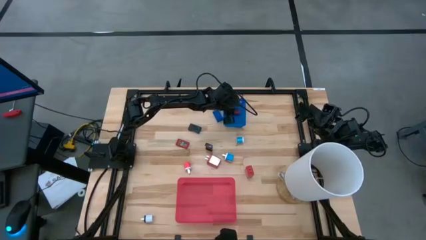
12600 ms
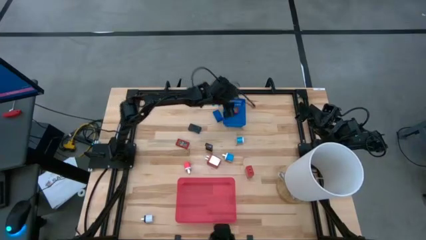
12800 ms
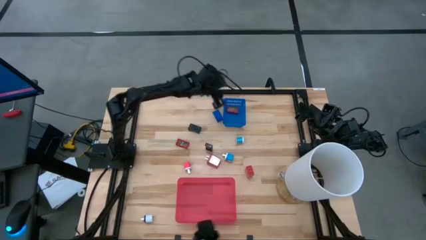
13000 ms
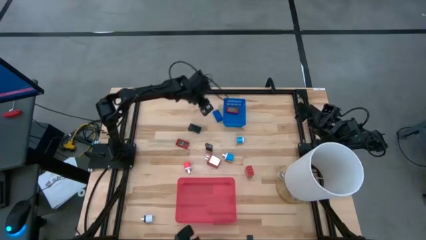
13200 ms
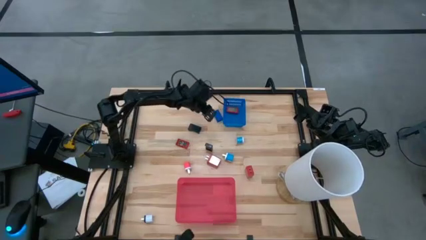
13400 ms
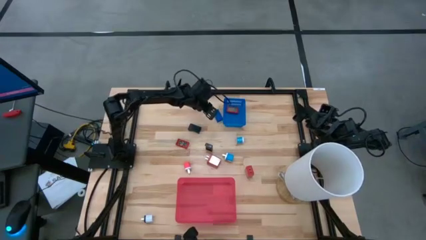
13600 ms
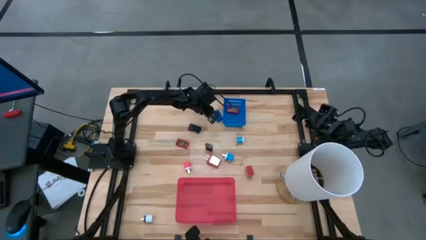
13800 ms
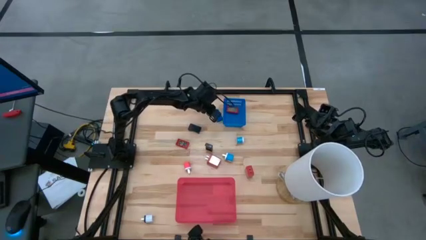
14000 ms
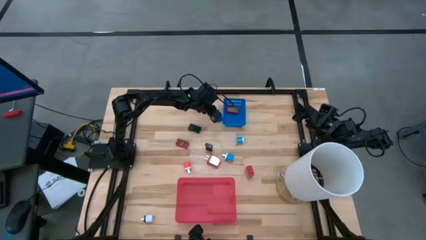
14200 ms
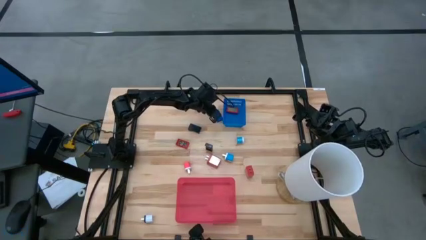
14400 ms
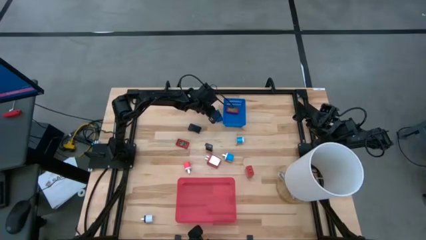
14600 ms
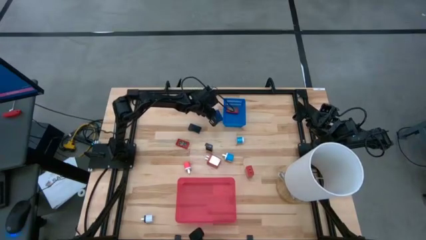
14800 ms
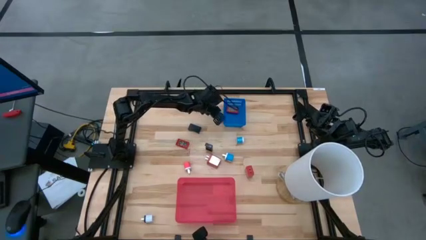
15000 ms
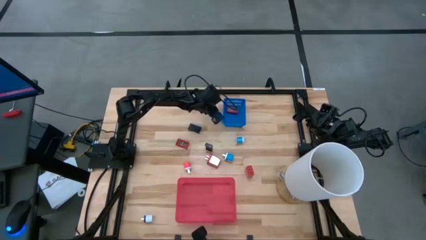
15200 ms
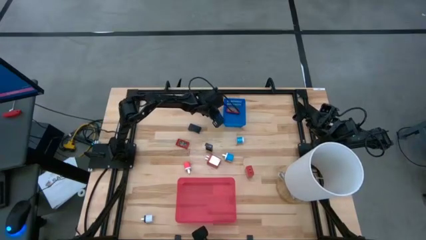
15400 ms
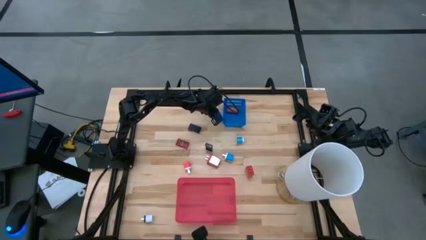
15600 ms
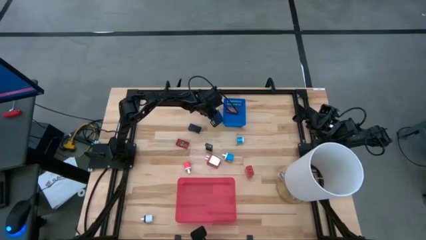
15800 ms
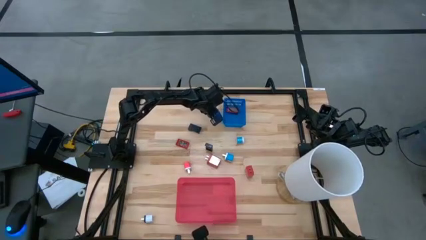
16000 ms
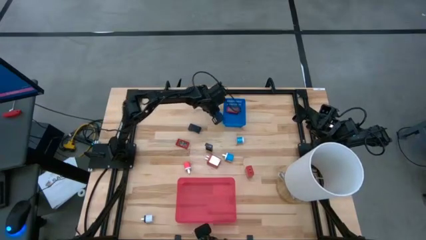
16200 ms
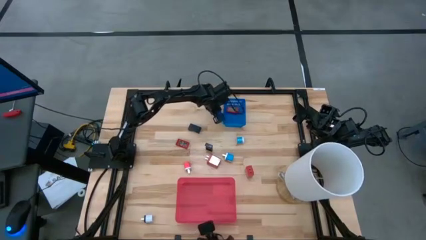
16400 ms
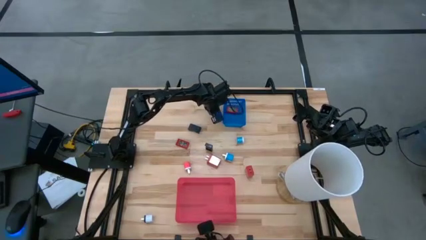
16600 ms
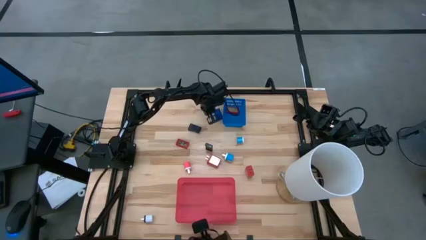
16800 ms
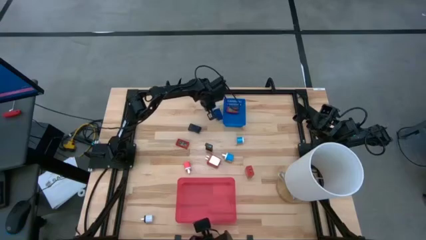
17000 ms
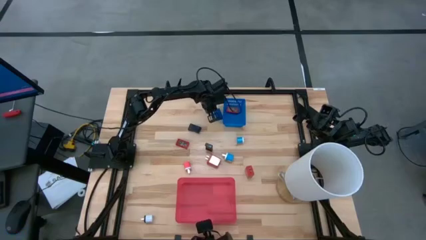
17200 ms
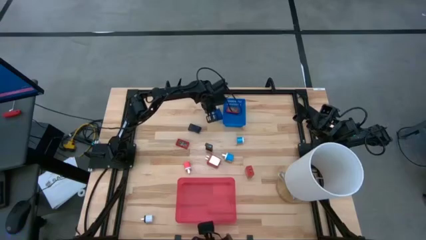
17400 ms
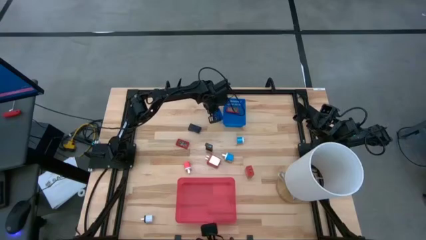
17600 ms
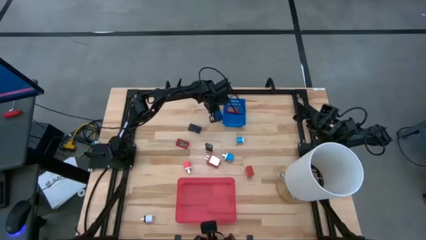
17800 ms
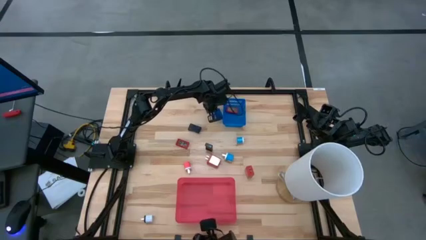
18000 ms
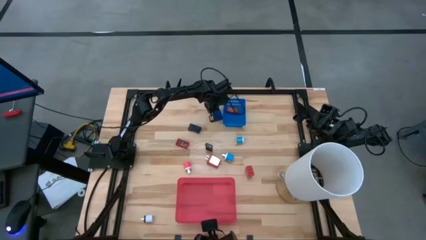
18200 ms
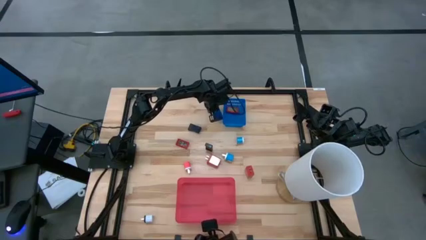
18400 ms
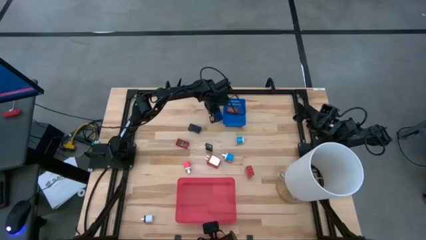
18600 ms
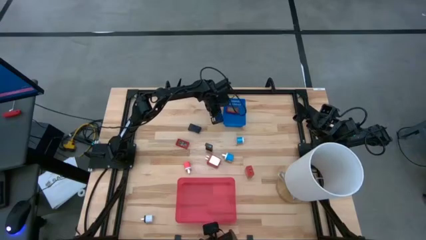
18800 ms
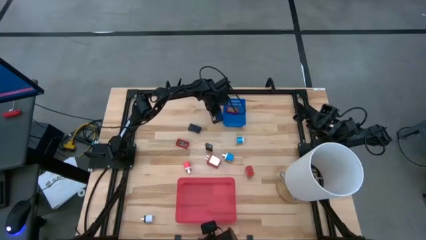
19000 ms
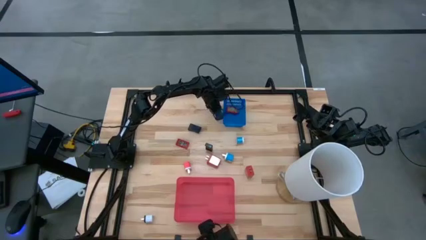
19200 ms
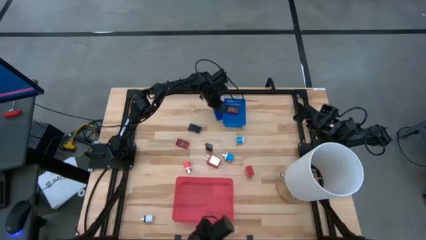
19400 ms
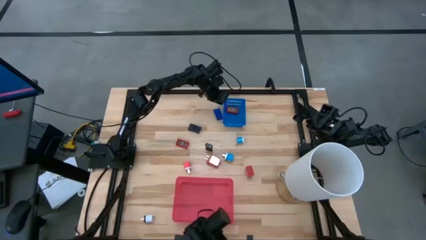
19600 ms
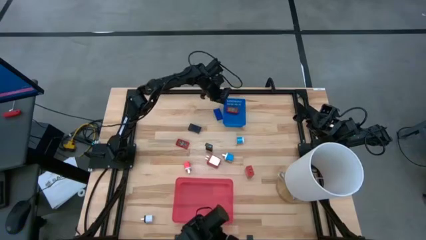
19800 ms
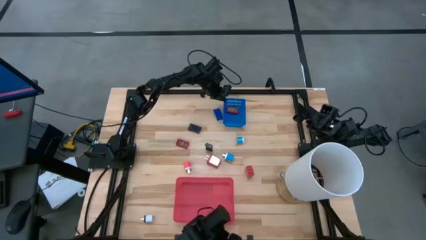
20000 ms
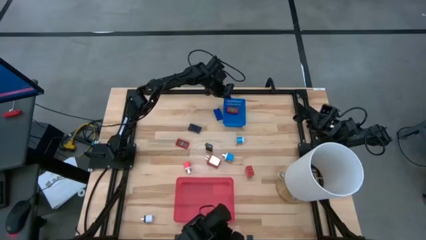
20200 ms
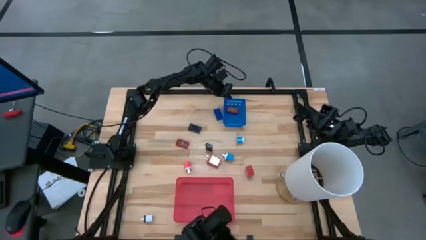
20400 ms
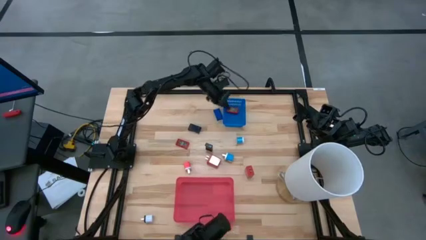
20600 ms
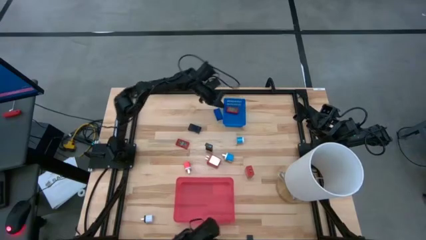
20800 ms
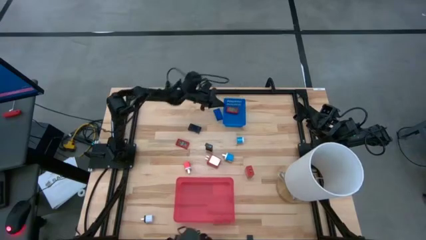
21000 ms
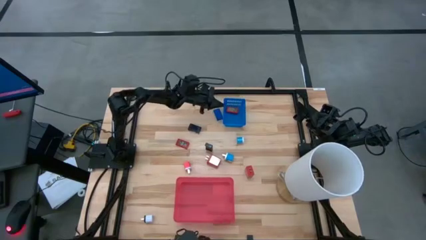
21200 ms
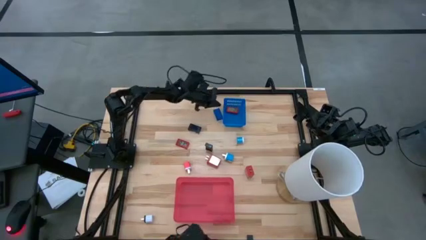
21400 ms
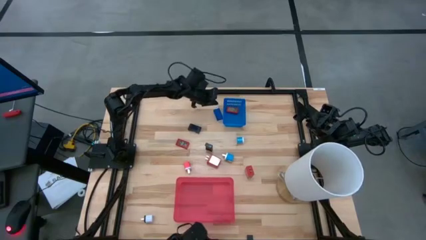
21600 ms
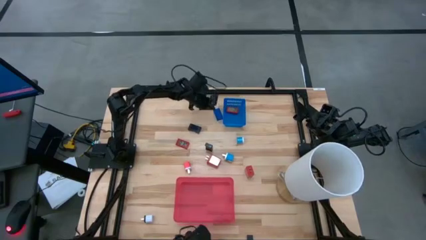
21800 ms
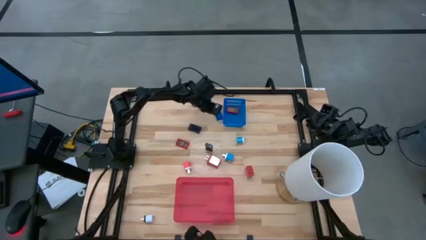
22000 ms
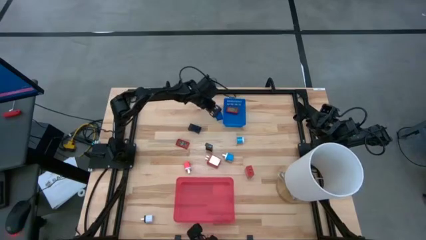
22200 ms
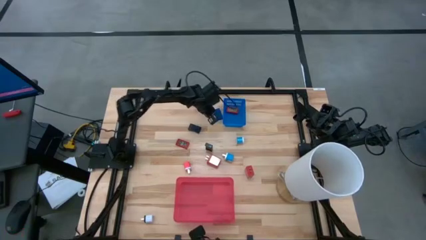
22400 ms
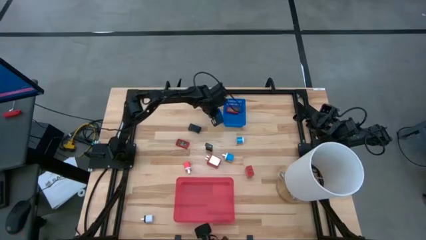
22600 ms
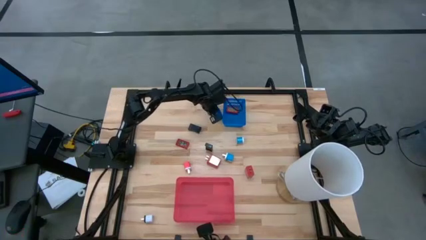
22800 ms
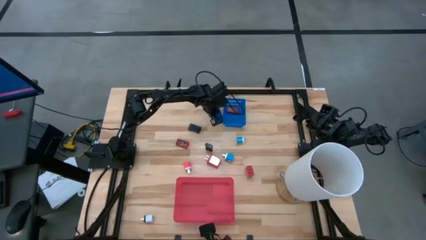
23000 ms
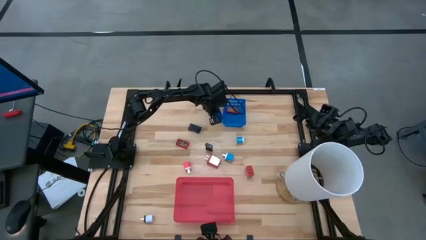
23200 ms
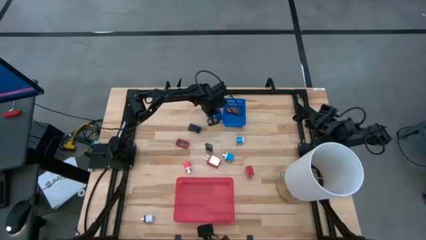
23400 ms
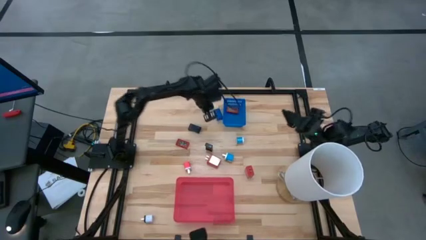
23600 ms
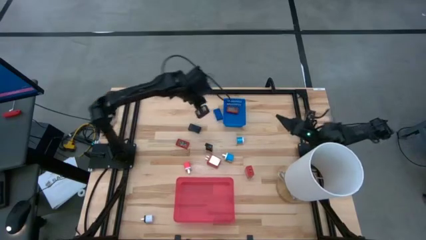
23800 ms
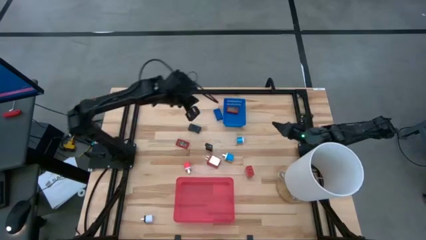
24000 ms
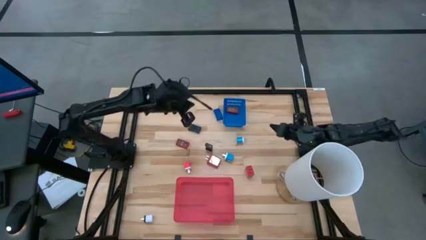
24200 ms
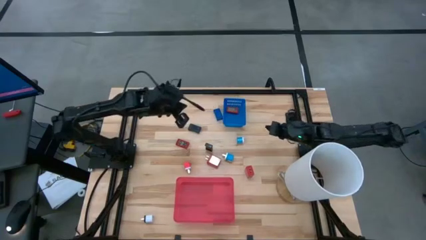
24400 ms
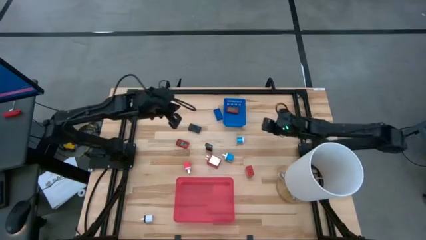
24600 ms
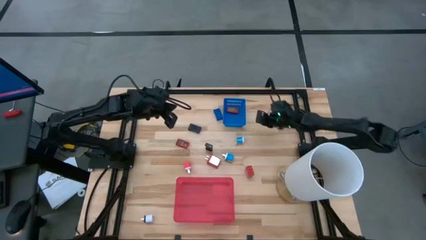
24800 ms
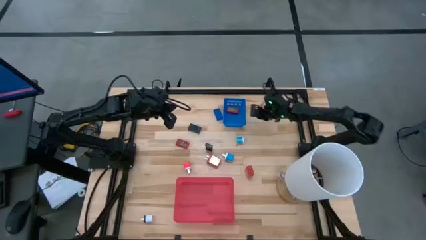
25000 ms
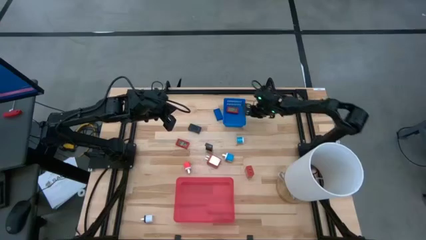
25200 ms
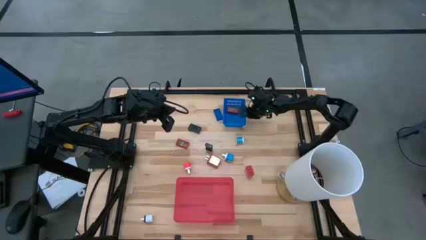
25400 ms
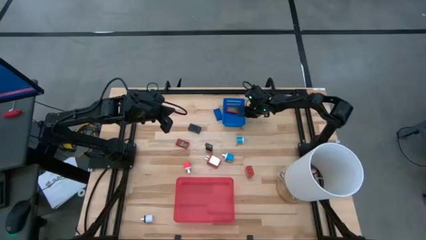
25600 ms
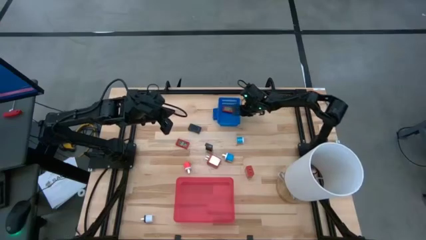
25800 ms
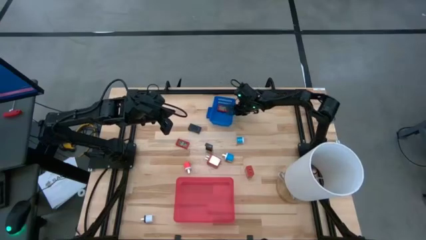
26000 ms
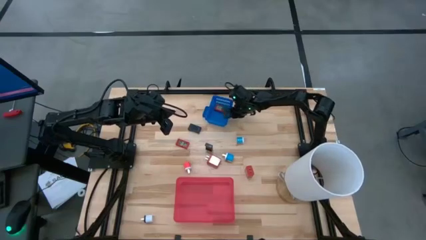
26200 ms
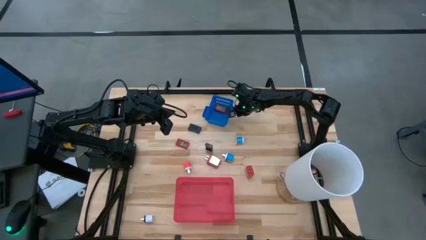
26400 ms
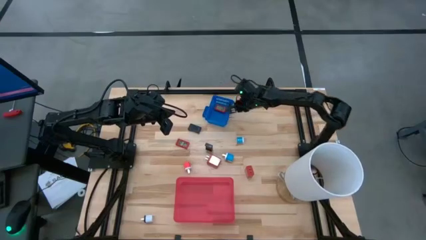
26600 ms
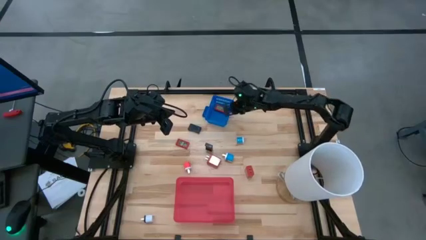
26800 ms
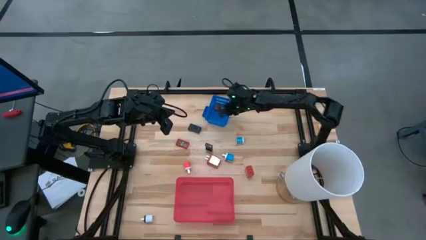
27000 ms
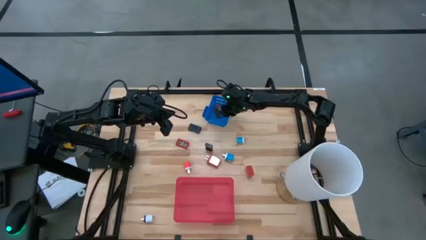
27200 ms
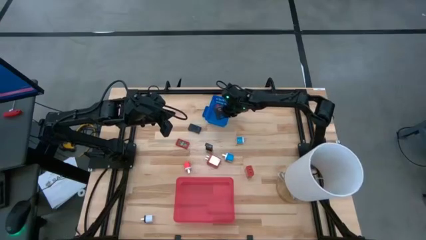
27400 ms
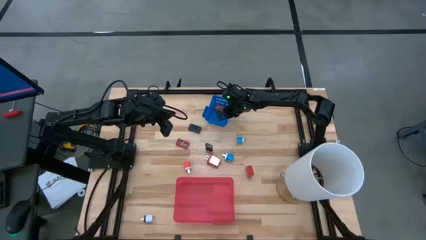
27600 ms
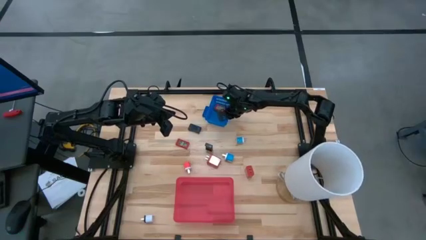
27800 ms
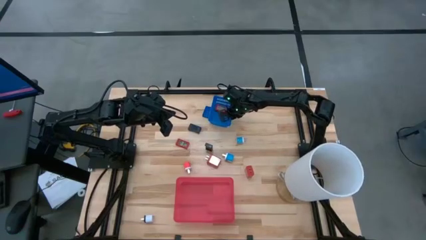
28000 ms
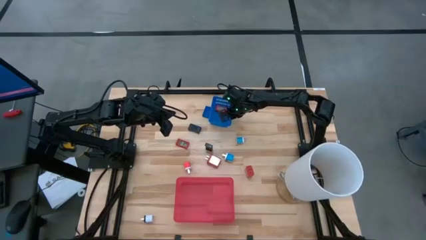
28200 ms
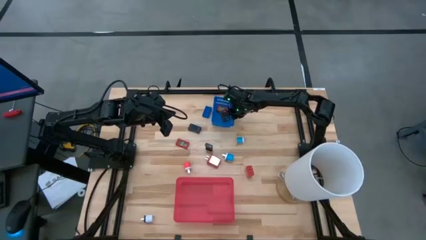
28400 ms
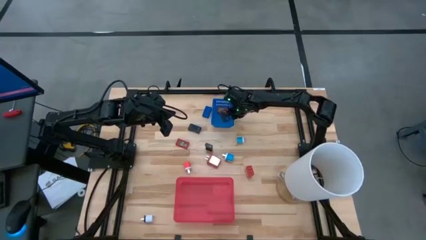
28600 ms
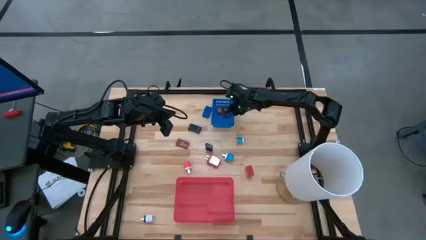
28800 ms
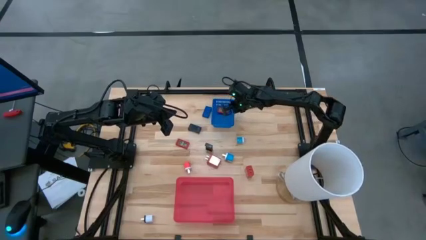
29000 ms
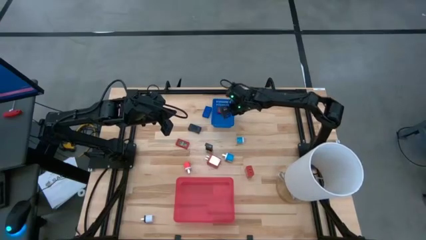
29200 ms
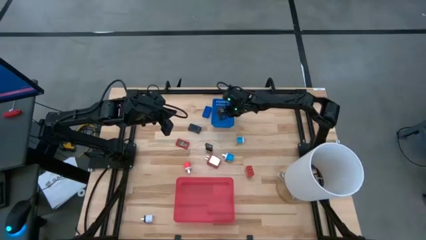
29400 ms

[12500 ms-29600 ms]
Task: Pick & Place Office items
Put the blue digital clock into the blue bin
